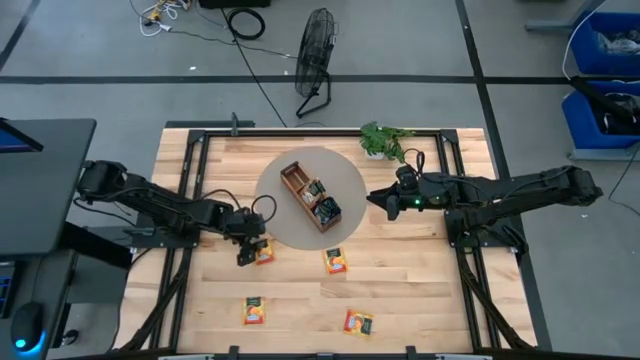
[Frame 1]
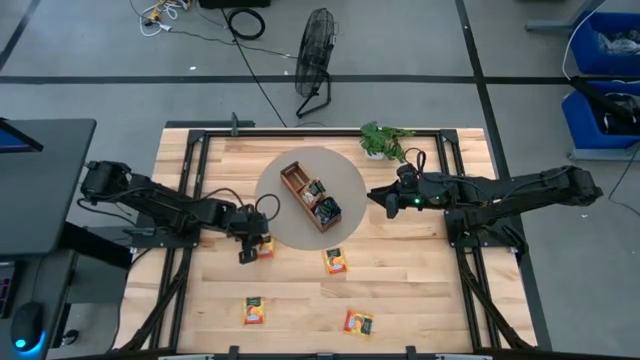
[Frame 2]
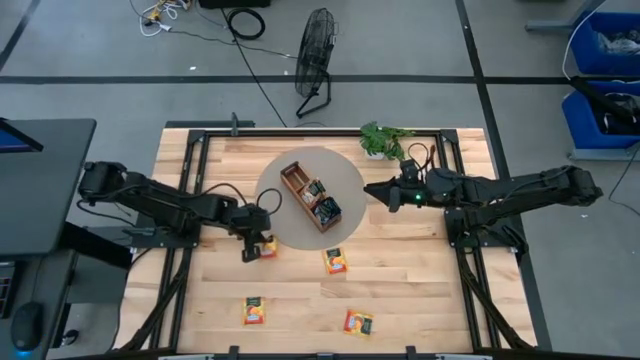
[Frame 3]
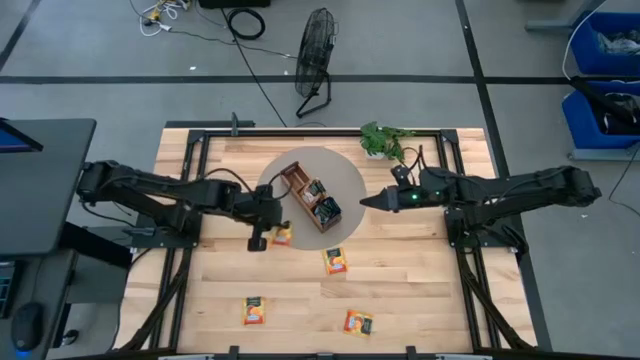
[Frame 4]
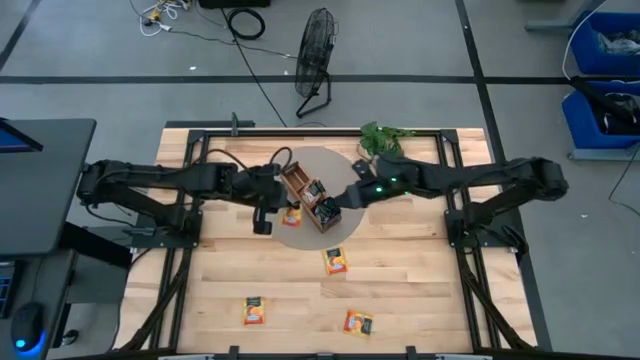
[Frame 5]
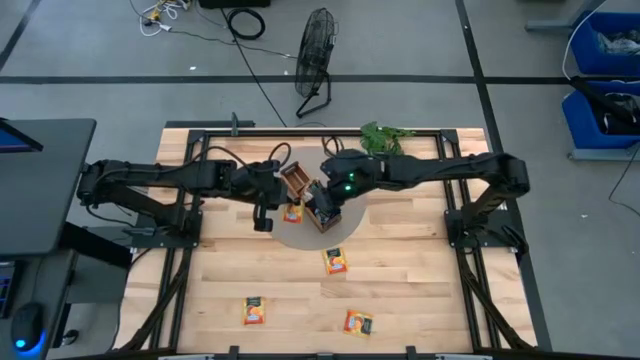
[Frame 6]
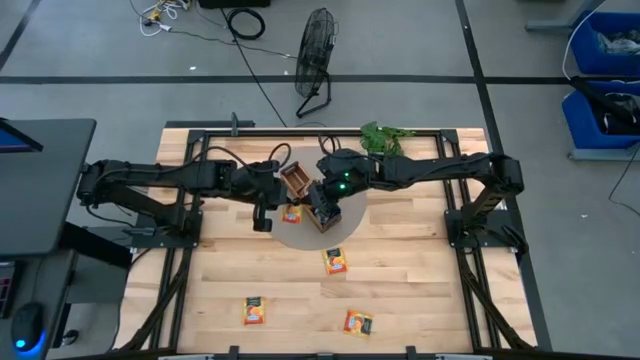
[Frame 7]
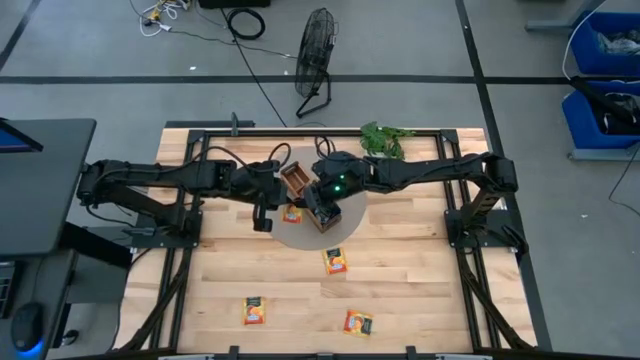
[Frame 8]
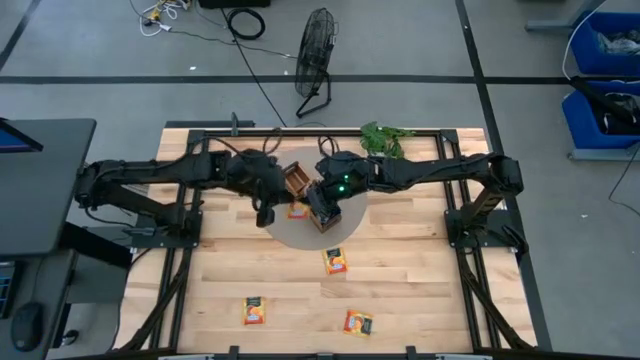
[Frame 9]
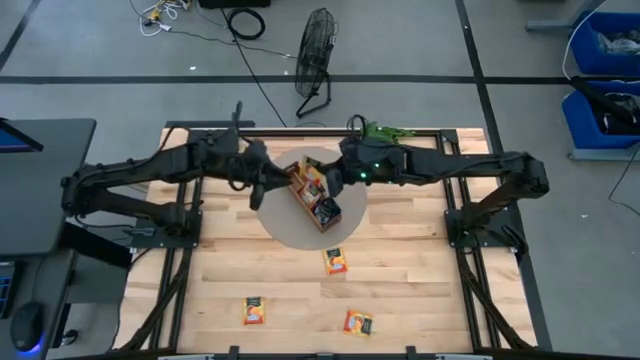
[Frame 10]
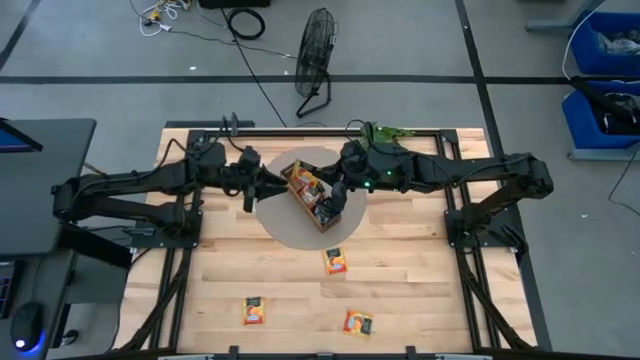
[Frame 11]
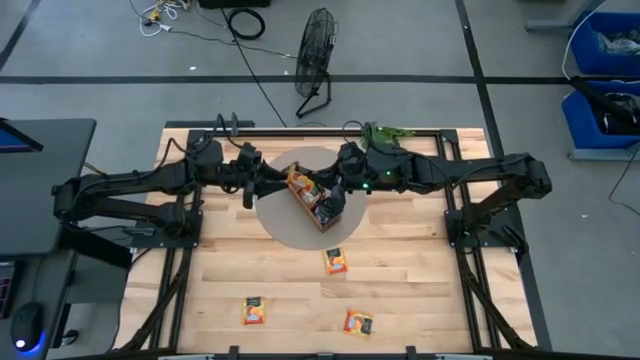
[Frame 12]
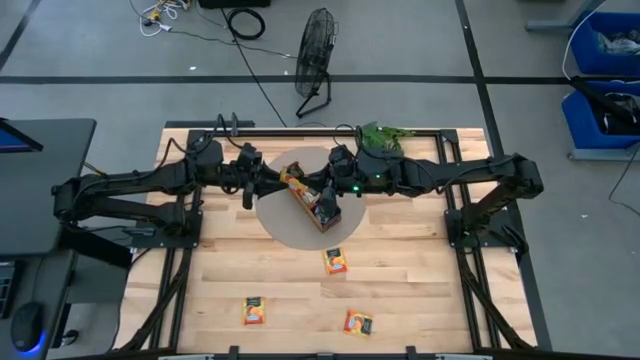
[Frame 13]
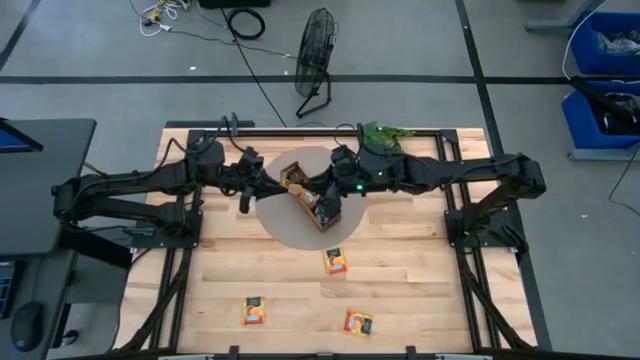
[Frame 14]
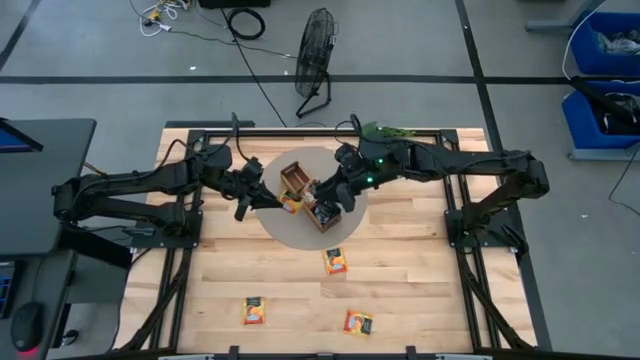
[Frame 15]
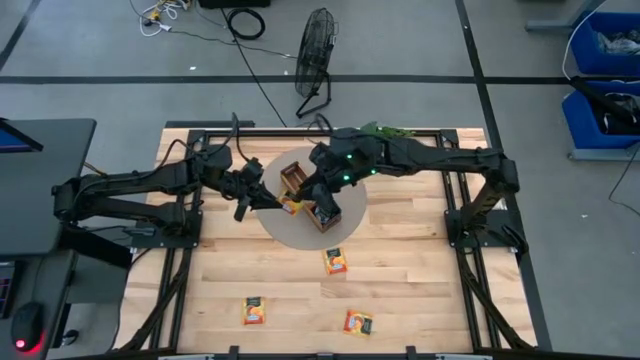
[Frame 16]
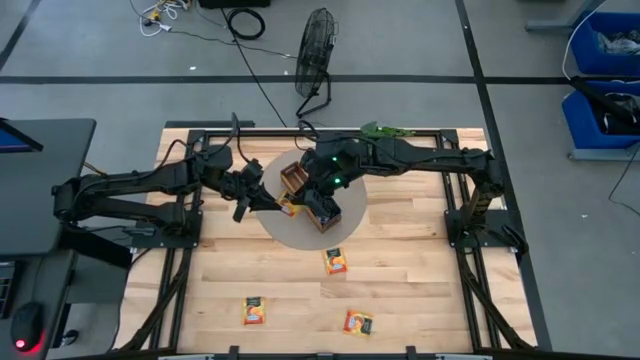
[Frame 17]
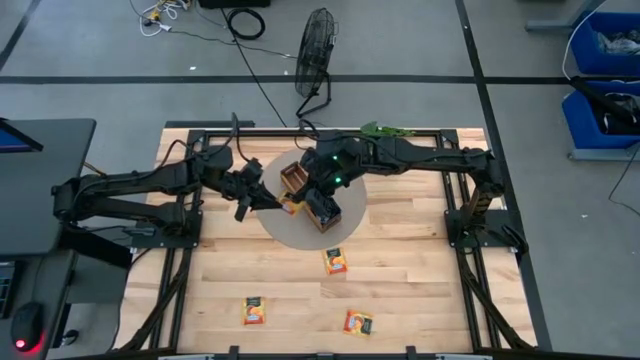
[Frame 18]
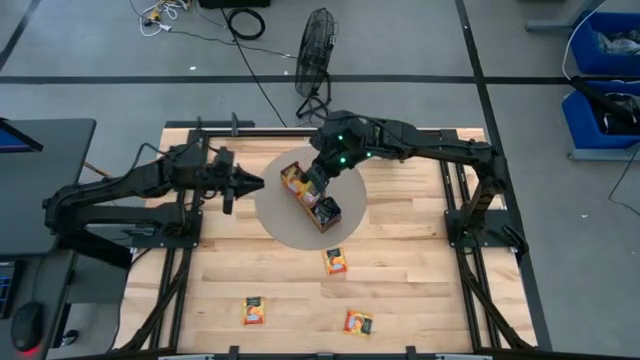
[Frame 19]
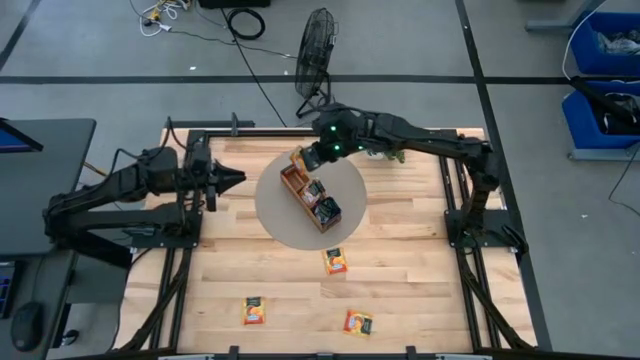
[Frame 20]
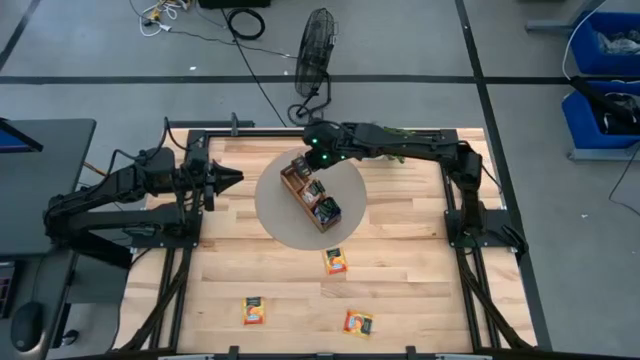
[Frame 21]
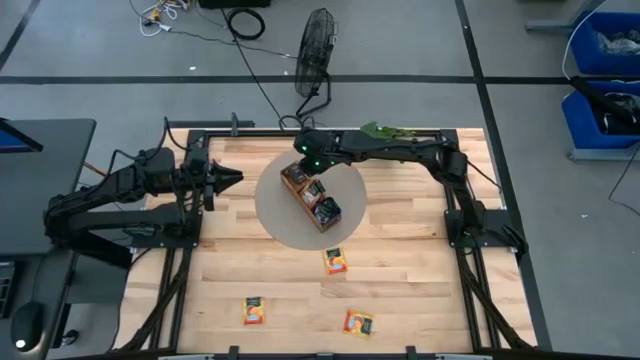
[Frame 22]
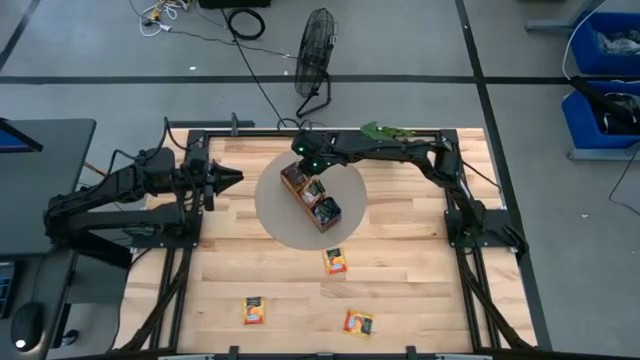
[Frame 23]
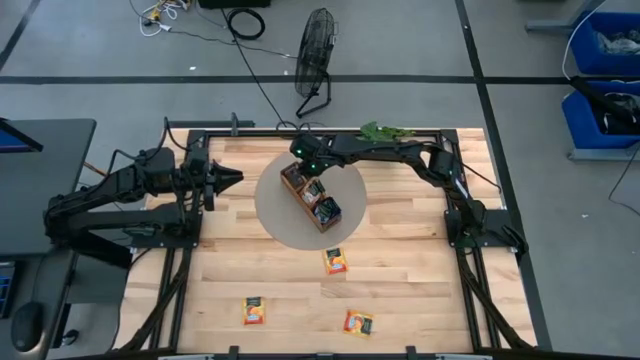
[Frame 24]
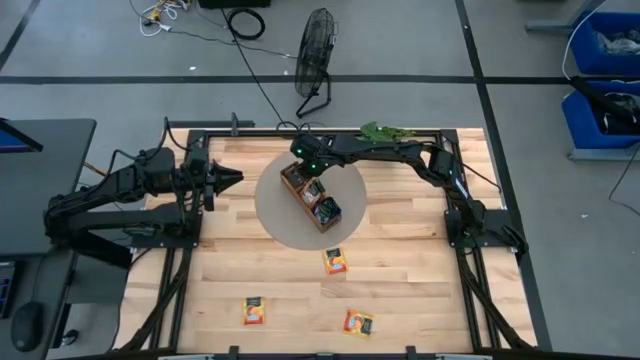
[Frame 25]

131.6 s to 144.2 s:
Task: Pick & Place Tea
Put the yellow tea bag into the left section of the wooden organizer

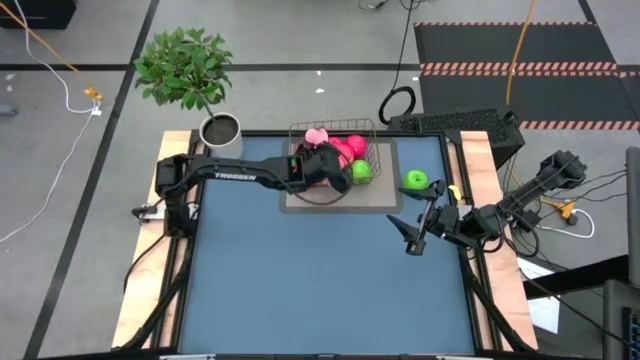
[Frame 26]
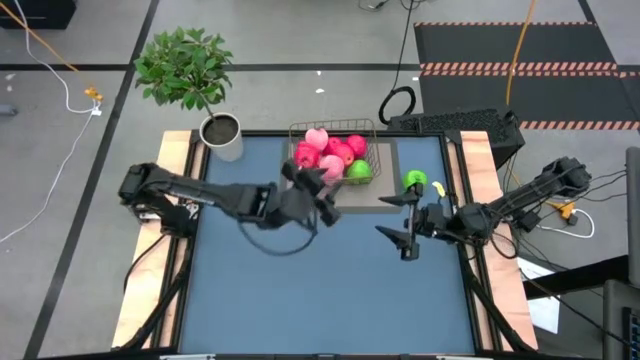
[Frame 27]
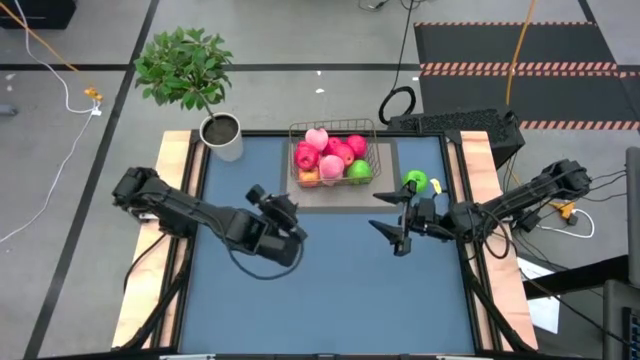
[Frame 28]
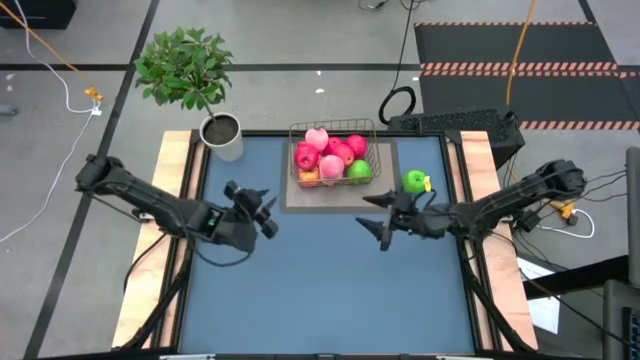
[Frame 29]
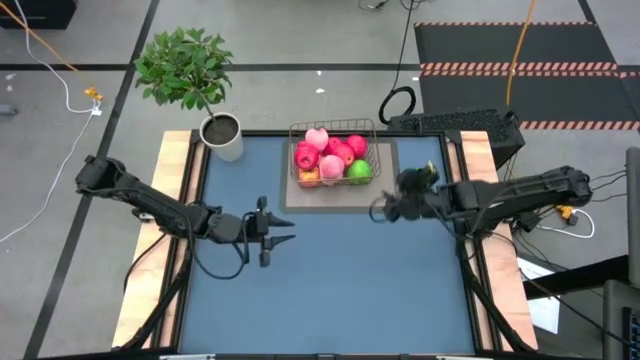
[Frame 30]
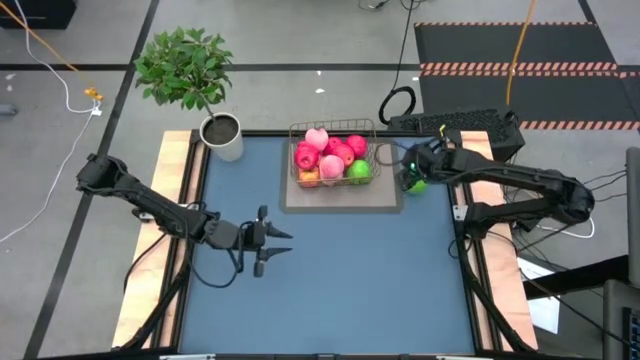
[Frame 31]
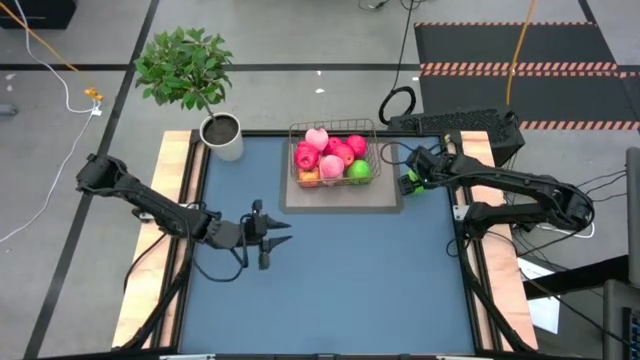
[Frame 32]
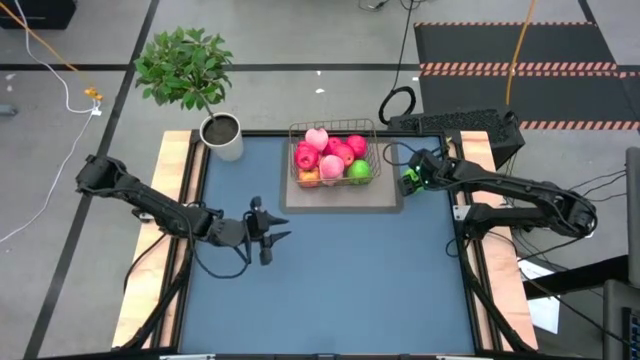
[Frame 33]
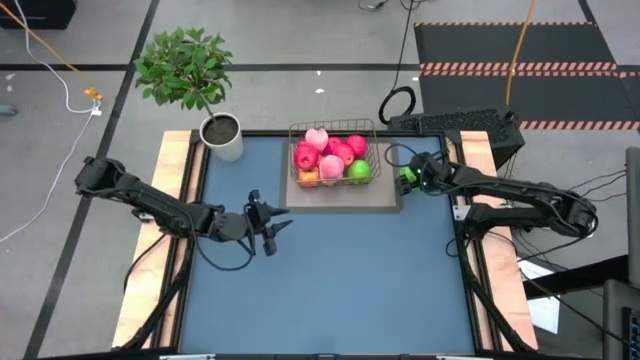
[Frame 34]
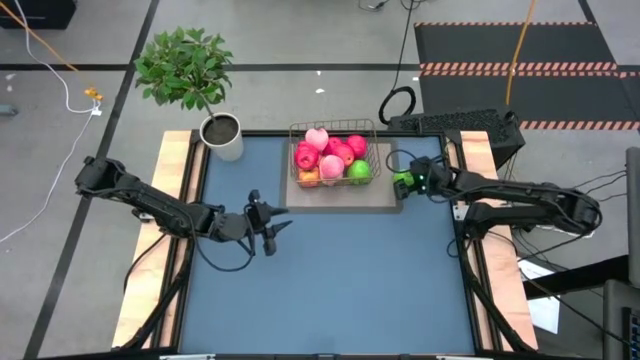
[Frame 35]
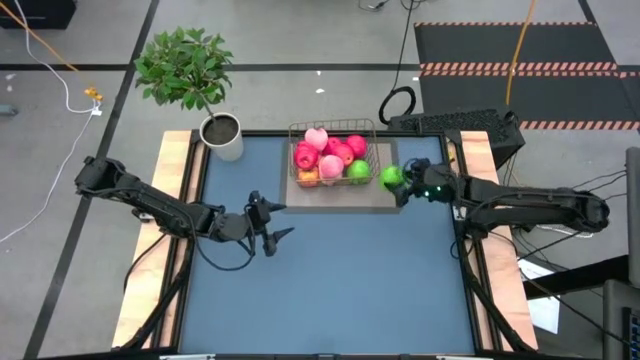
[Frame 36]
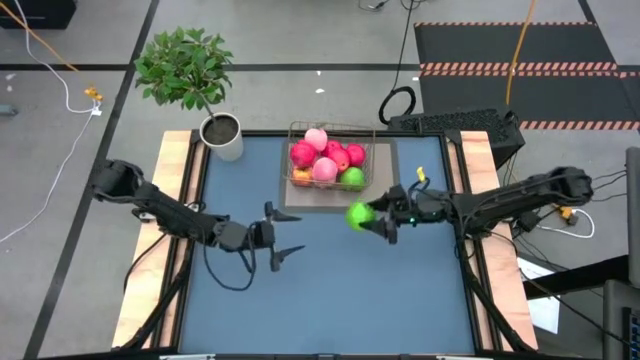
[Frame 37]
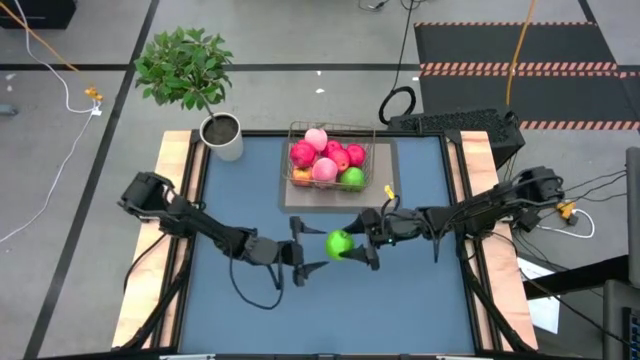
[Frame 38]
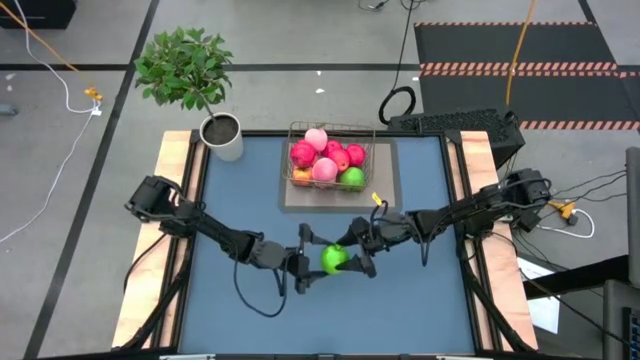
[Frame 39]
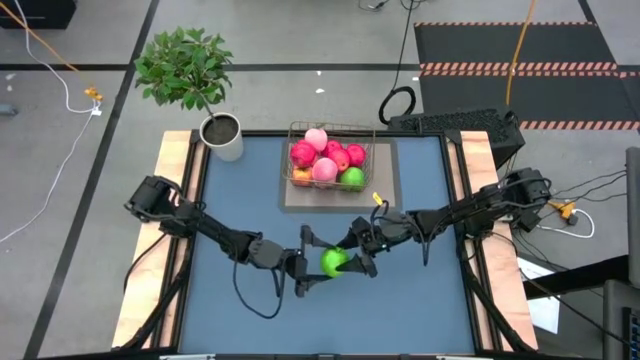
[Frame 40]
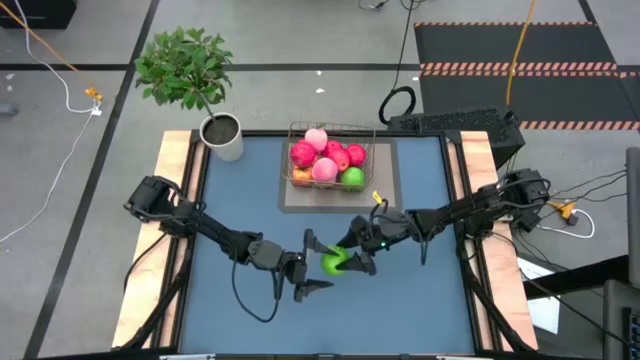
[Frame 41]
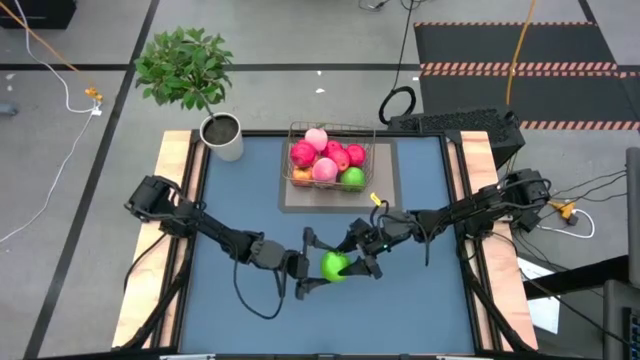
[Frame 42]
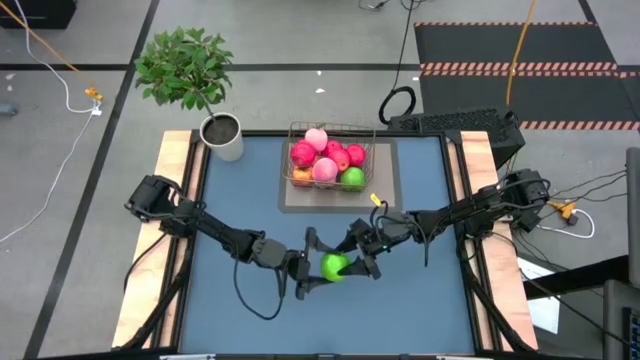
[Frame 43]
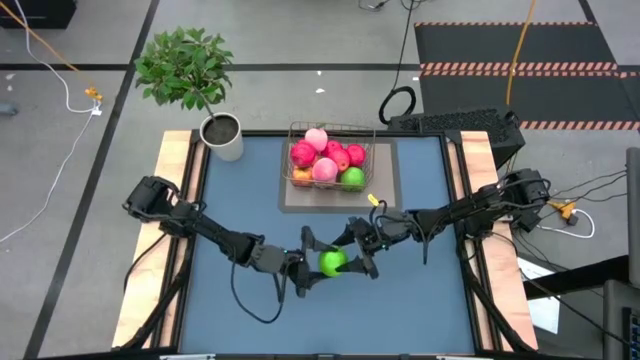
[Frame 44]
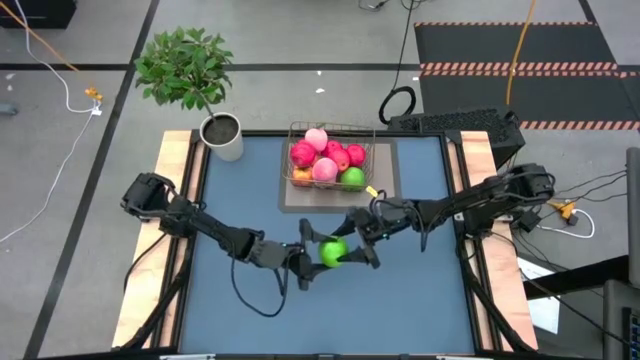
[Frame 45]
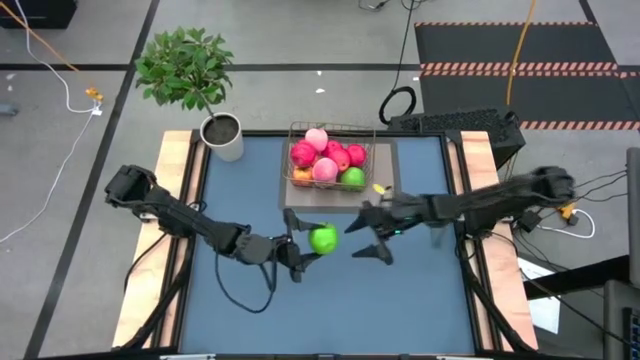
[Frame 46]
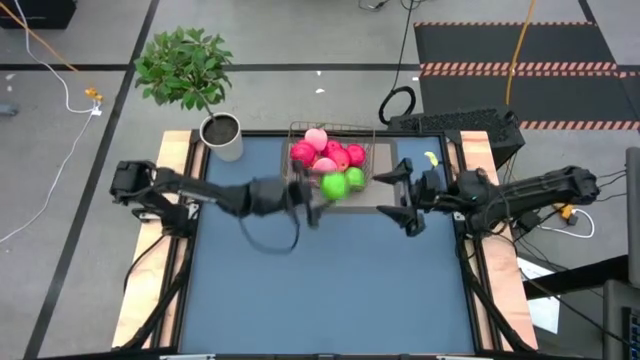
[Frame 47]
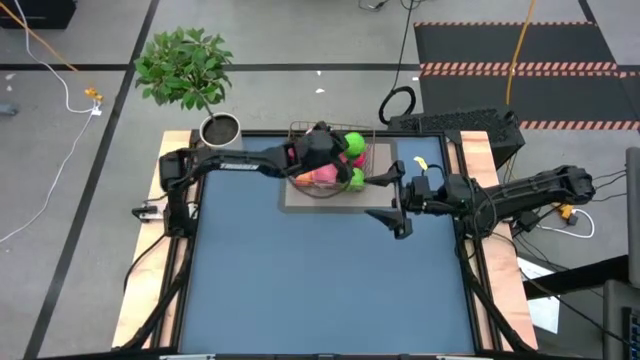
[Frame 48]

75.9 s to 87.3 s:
Task: Build produce basket
Put the green apple into the wire basket
